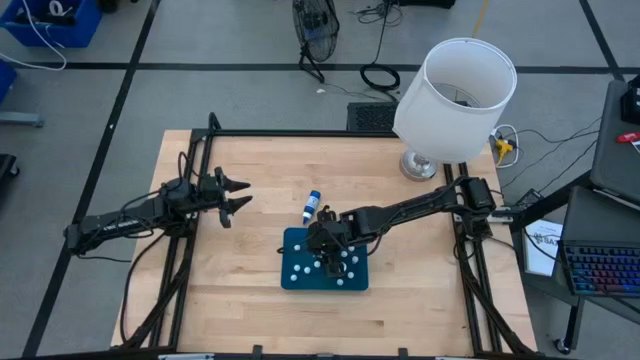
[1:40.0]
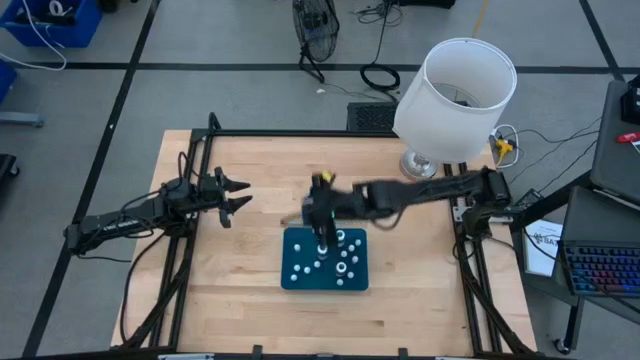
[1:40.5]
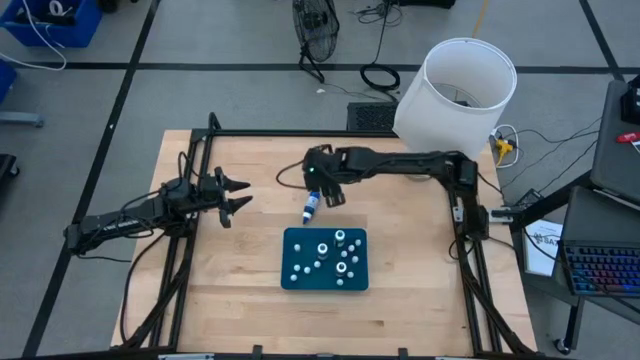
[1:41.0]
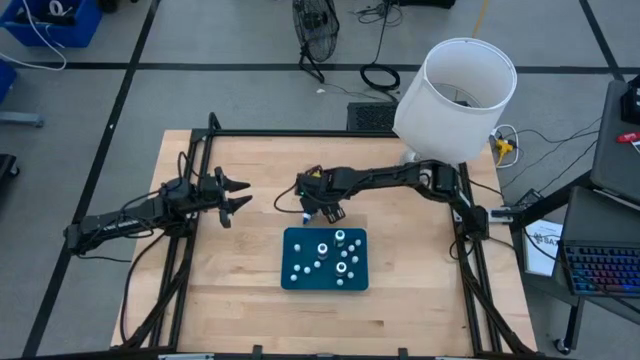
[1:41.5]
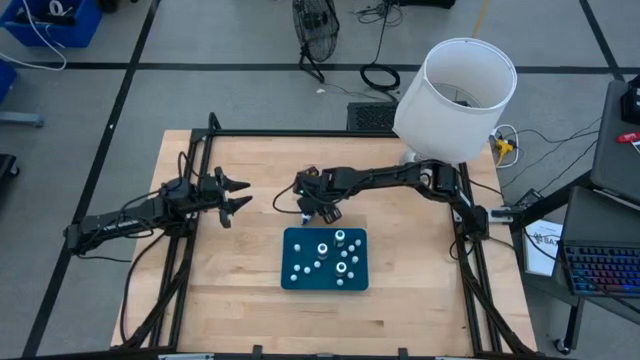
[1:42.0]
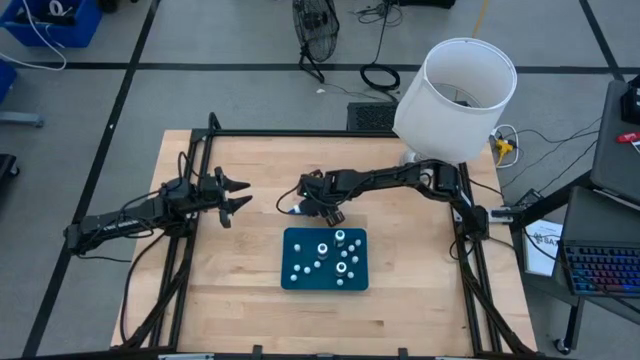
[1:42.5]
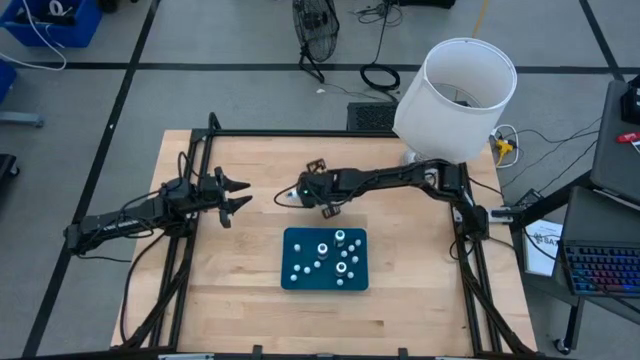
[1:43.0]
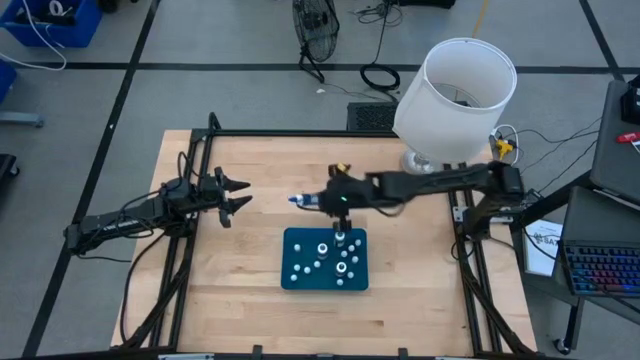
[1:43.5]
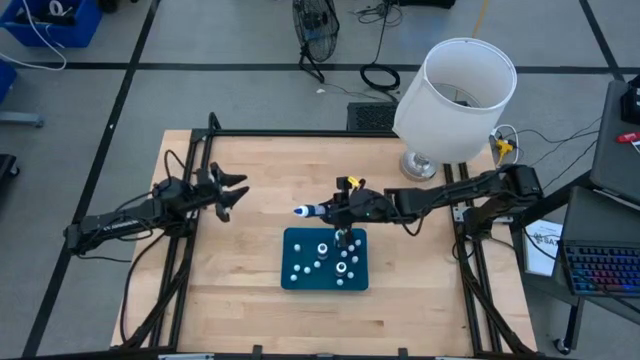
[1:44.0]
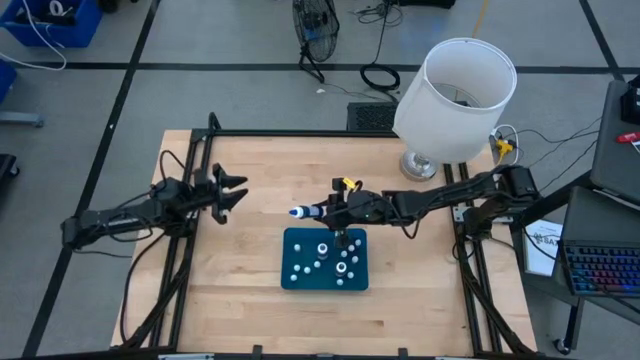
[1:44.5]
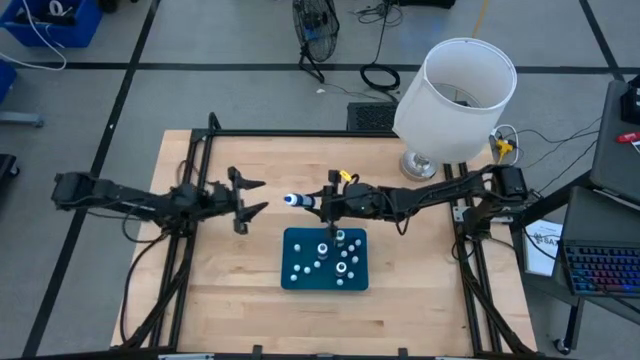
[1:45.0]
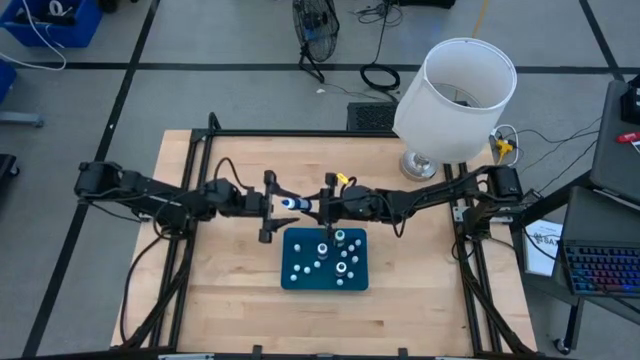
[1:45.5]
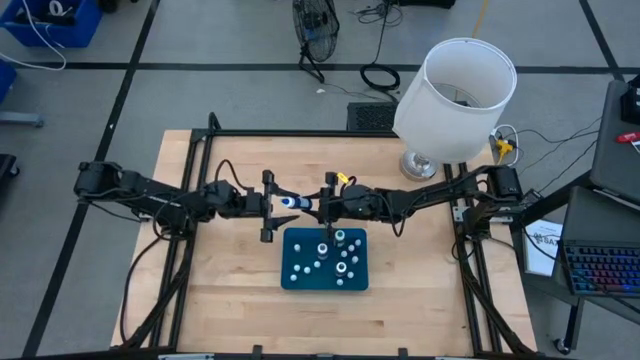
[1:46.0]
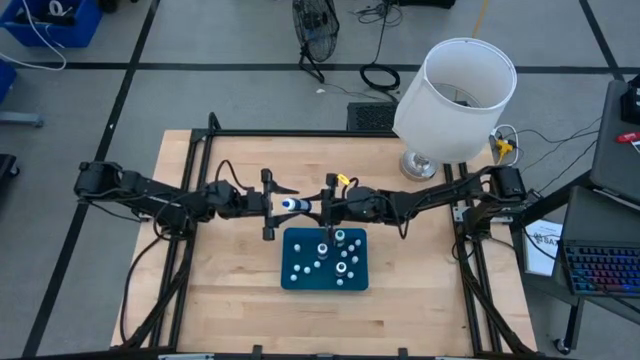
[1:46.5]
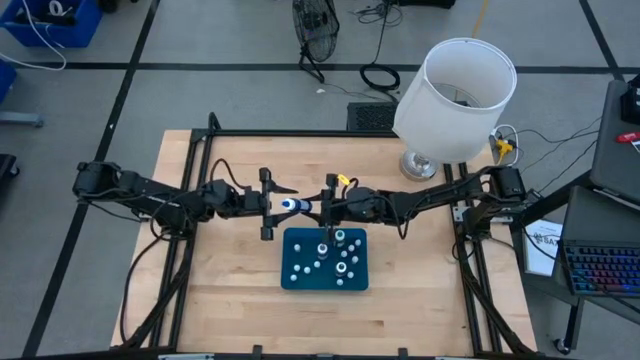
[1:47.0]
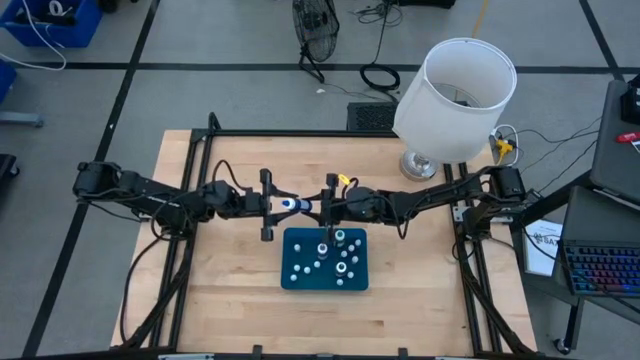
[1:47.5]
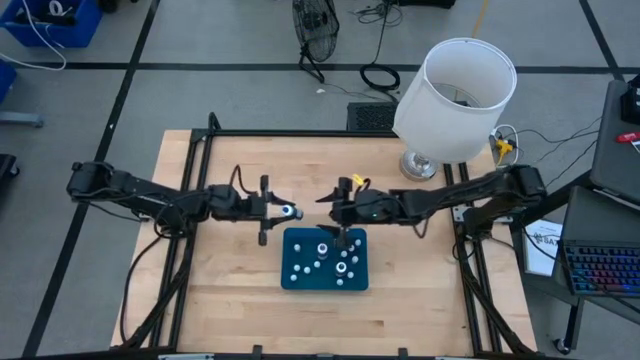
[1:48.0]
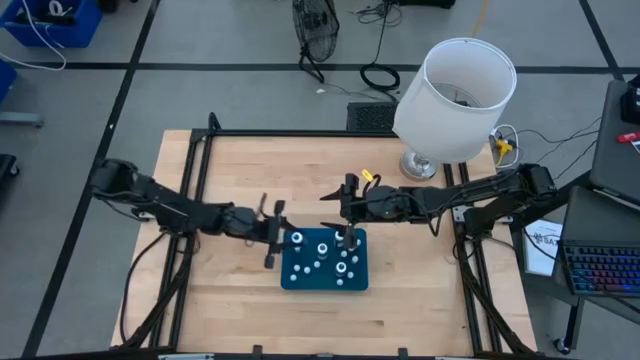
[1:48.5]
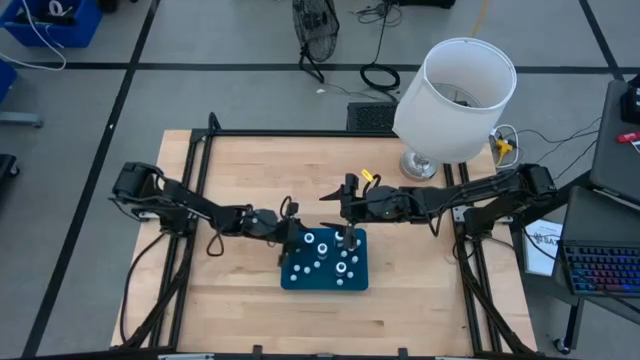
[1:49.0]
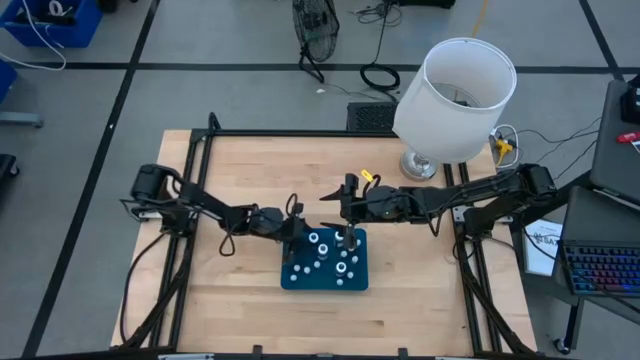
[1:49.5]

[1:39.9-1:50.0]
Task: Pick & Place food coloring
Put the blue food coloring bottle into the bin

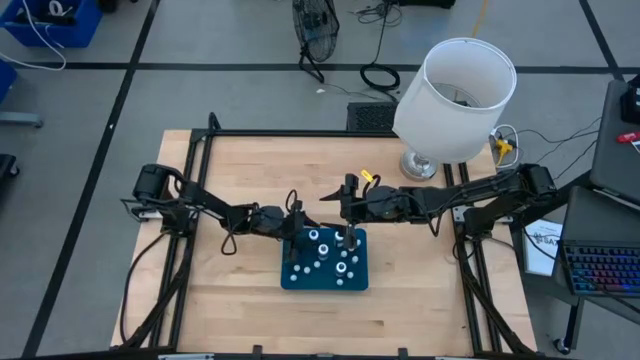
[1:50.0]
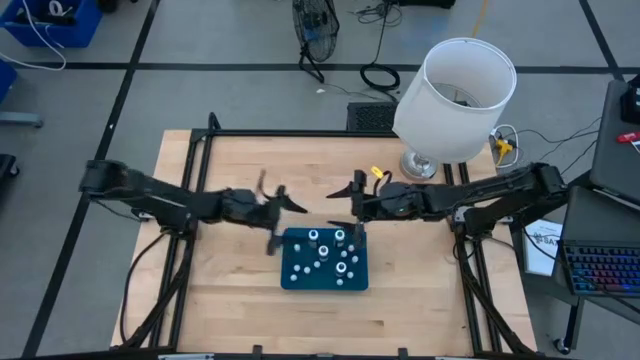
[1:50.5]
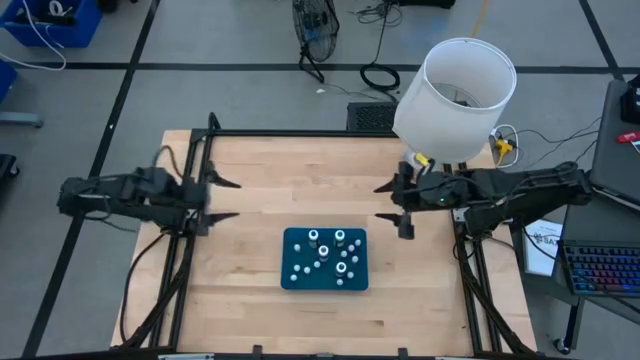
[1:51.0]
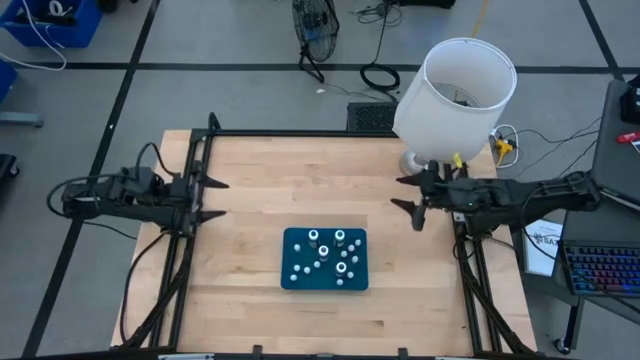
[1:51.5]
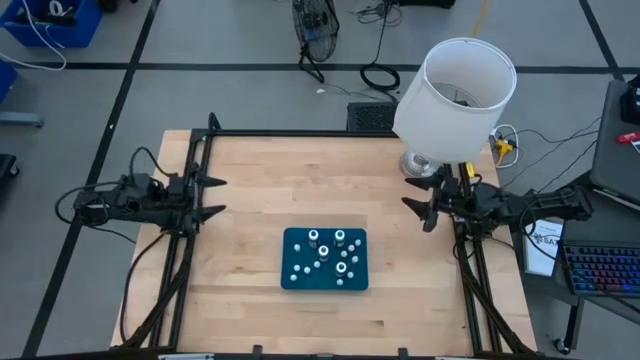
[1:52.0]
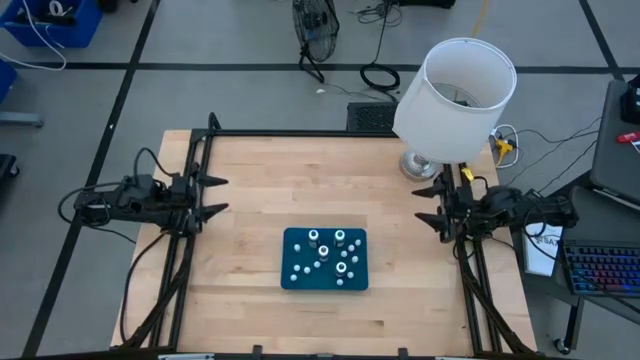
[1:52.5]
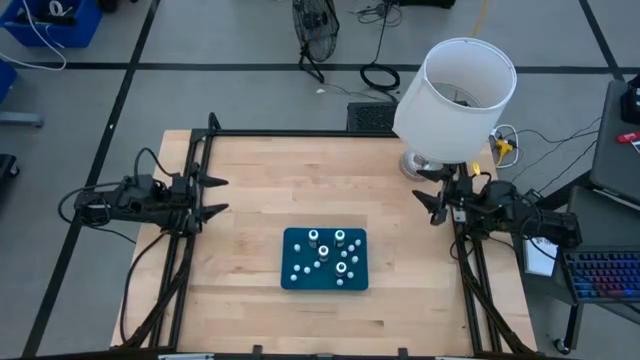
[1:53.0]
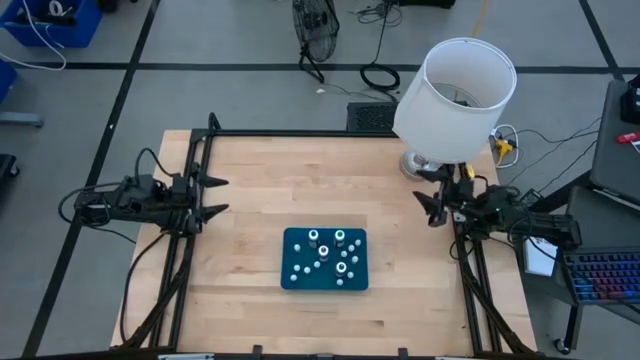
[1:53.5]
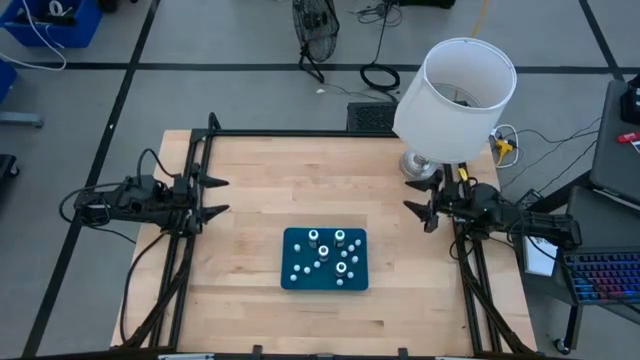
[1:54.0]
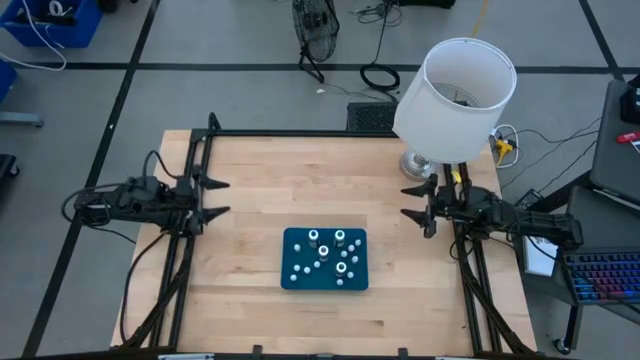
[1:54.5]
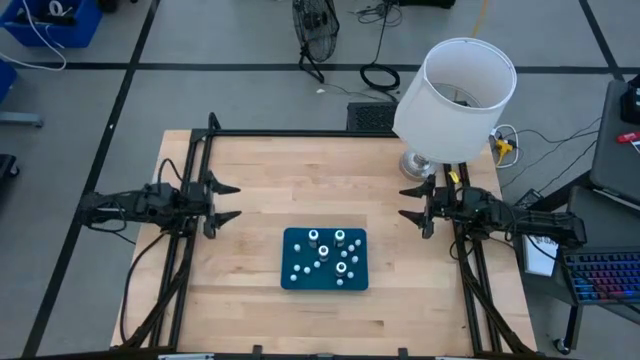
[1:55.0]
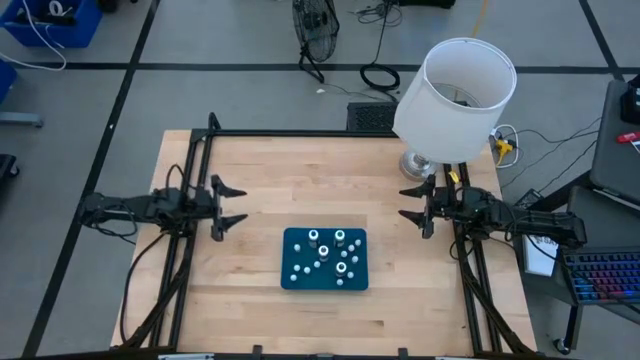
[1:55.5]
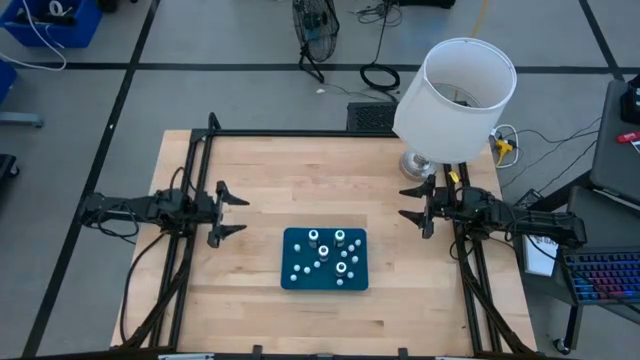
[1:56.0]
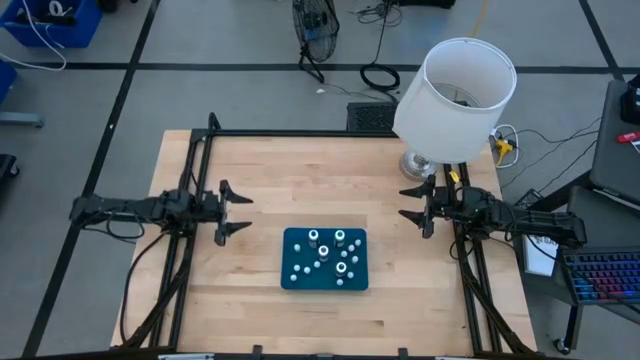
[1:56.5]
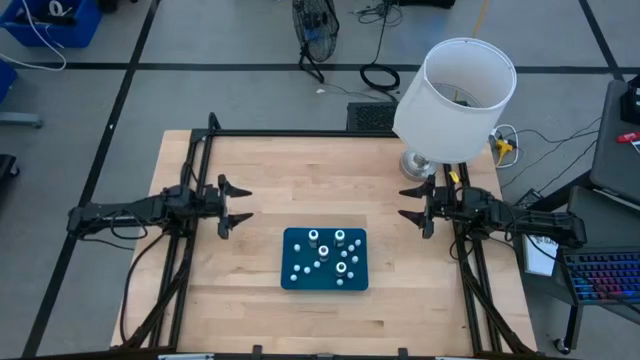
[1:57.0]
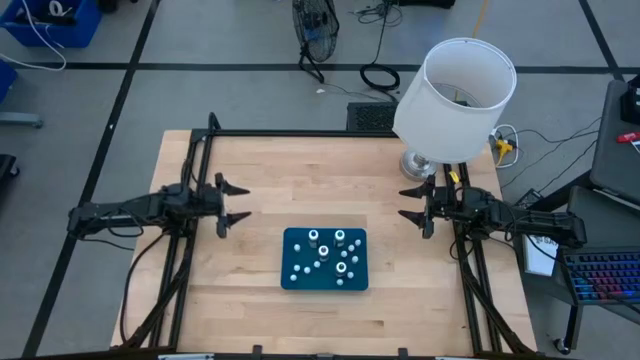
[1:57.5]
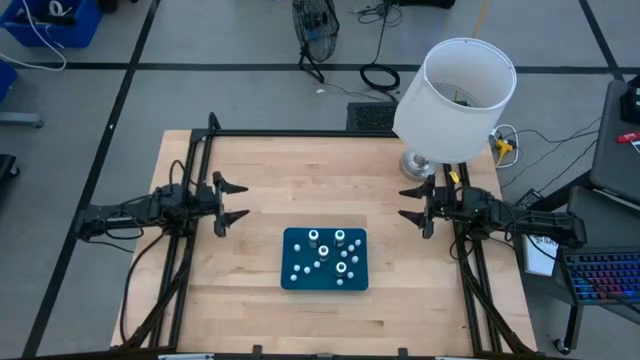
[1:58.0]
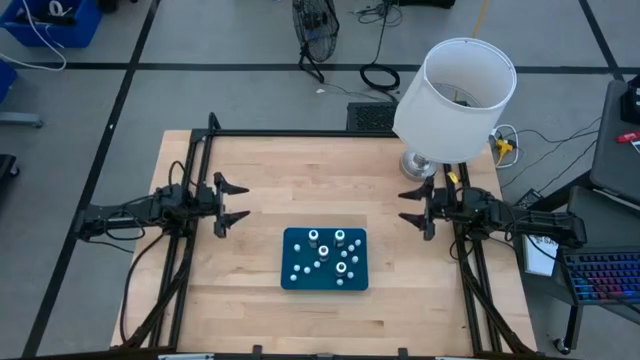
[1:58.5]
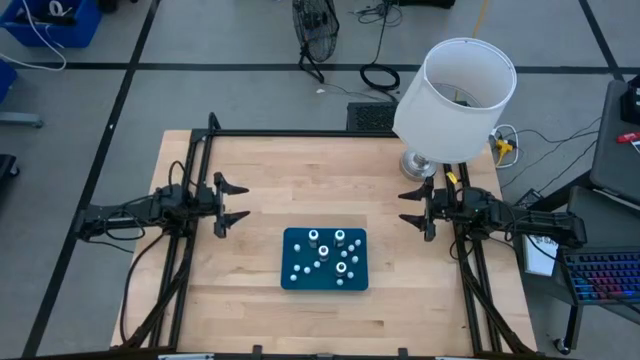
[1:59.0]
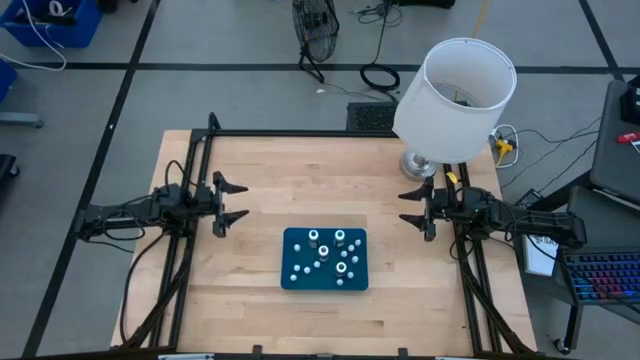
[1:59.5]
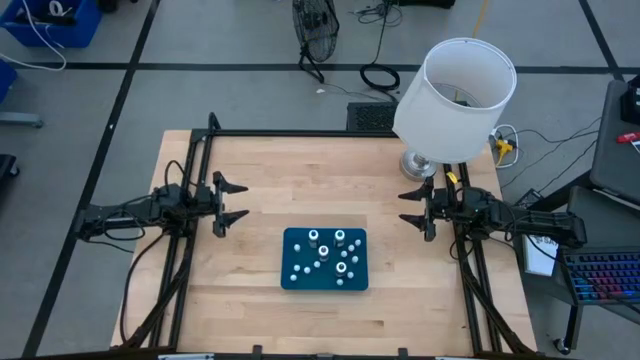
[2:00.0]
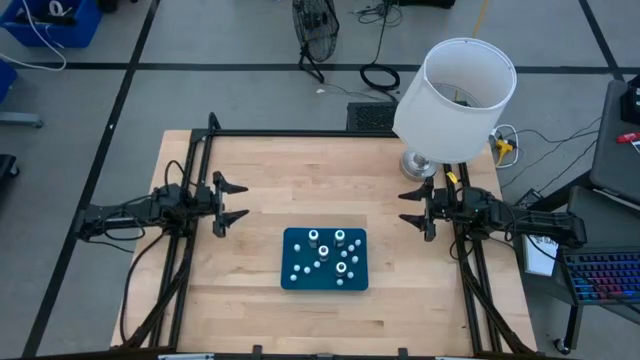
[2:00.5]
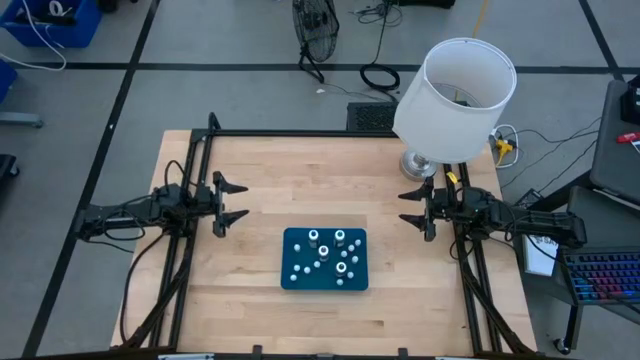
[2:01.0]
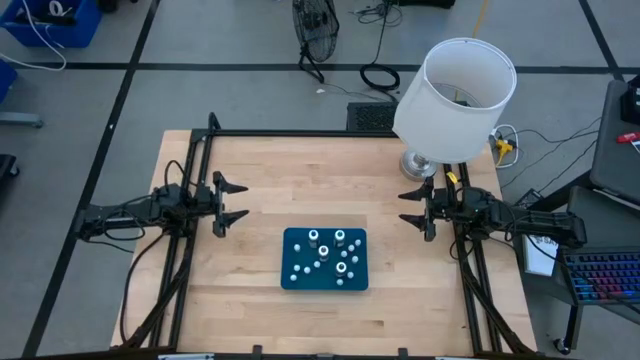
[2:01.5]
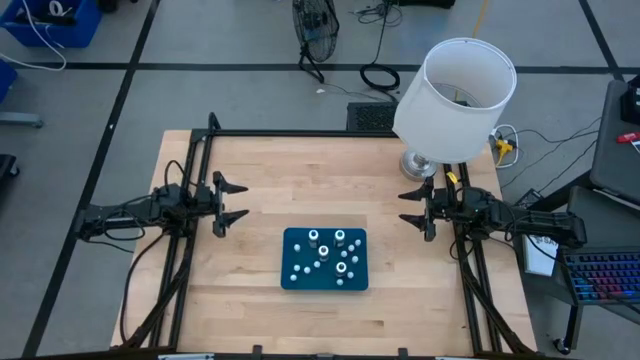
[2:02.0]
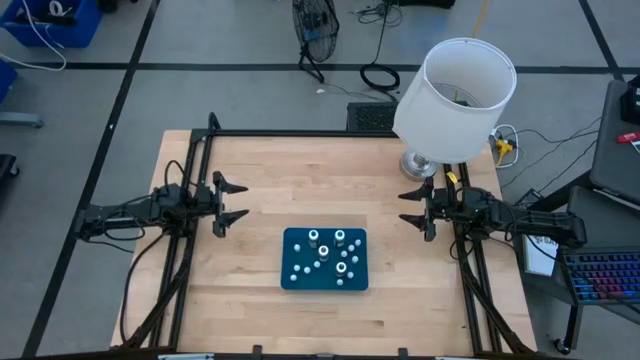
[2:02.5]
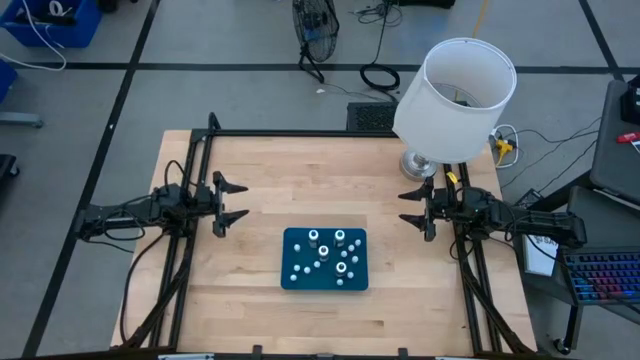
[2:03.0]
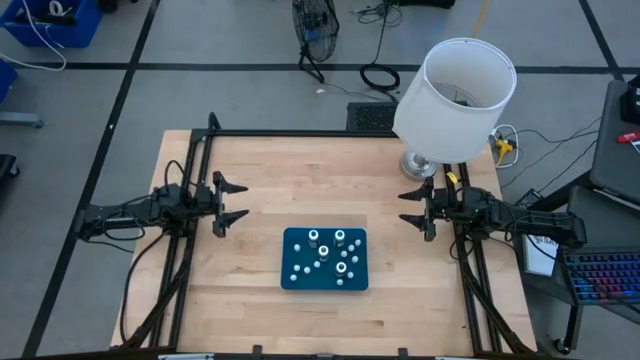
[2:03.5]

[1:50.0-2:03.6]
Return to Home Position
